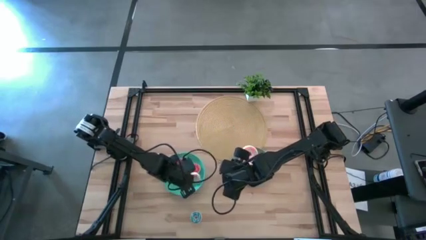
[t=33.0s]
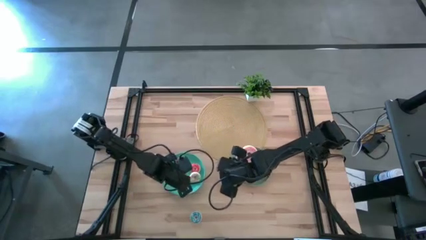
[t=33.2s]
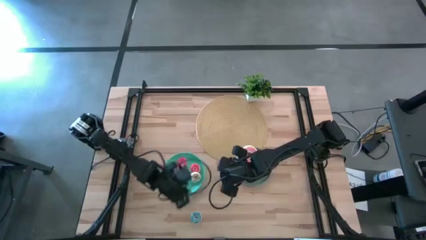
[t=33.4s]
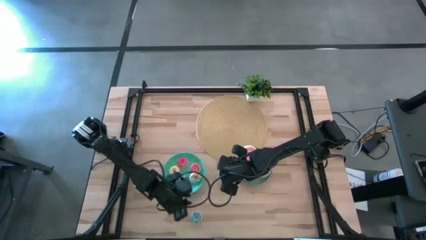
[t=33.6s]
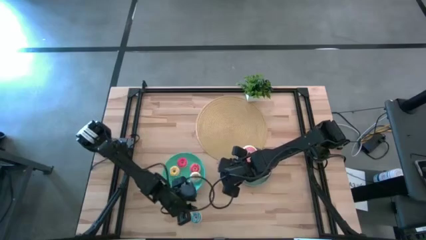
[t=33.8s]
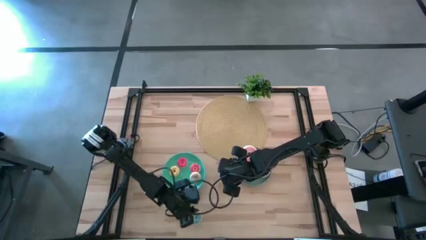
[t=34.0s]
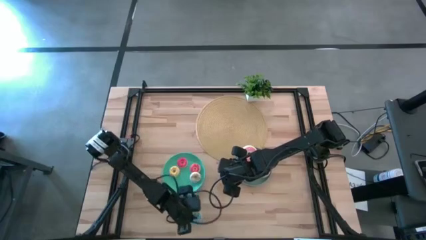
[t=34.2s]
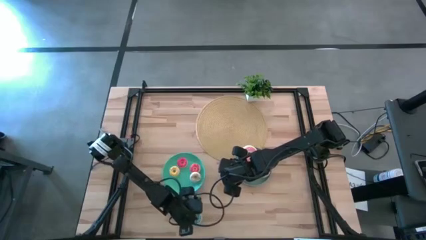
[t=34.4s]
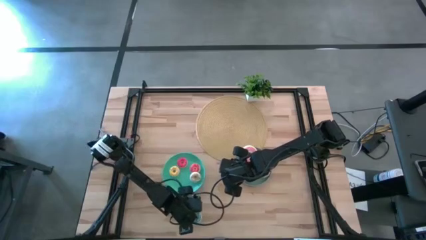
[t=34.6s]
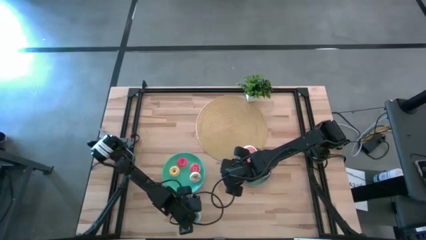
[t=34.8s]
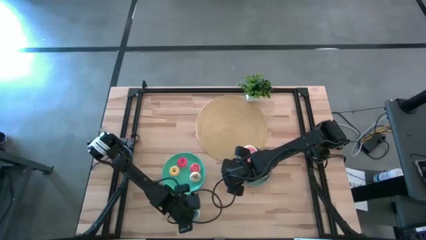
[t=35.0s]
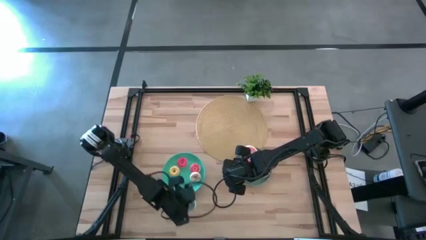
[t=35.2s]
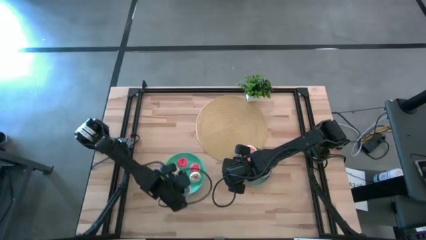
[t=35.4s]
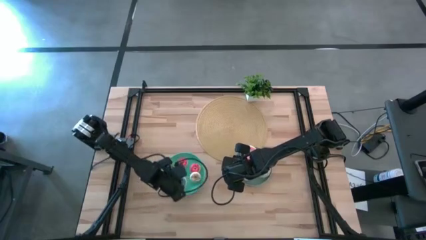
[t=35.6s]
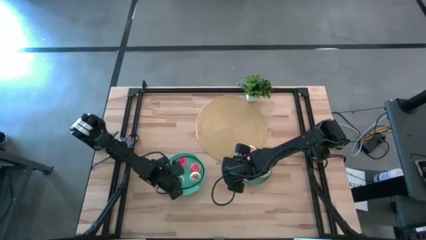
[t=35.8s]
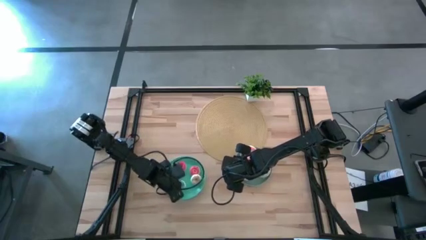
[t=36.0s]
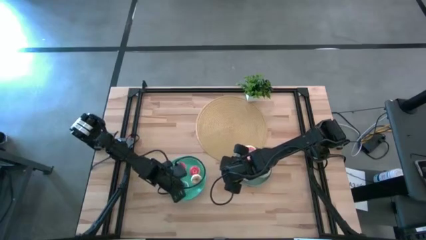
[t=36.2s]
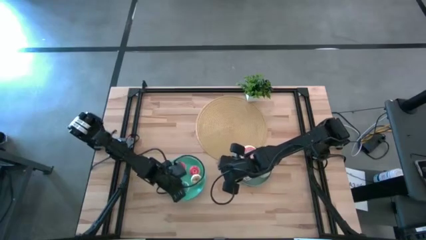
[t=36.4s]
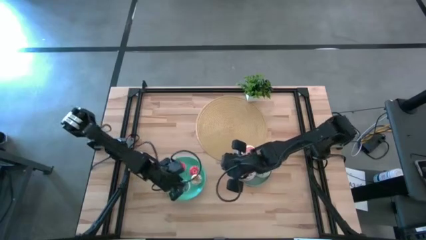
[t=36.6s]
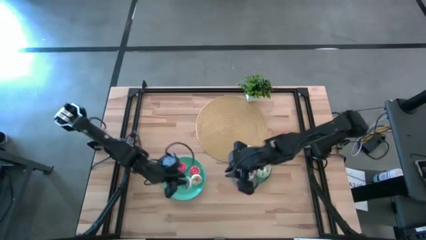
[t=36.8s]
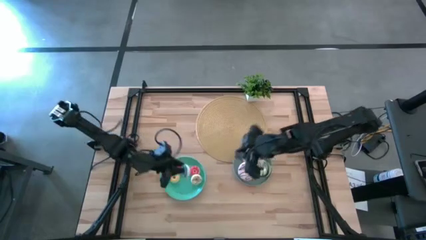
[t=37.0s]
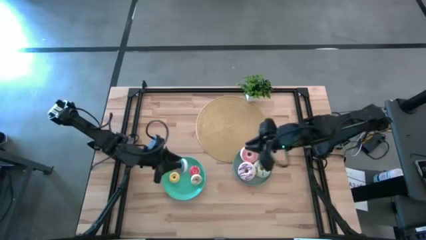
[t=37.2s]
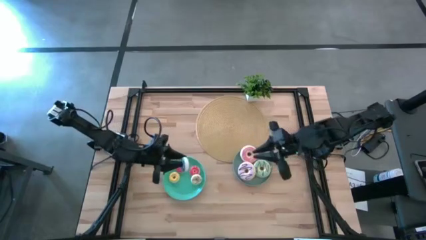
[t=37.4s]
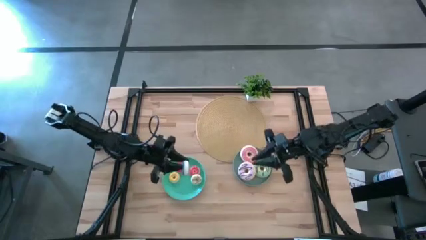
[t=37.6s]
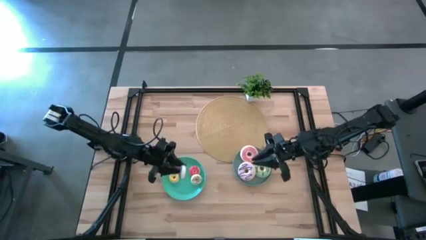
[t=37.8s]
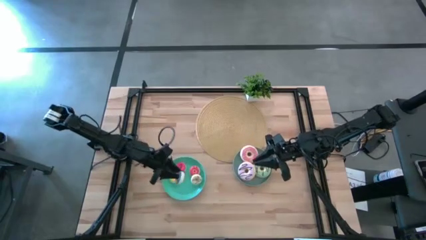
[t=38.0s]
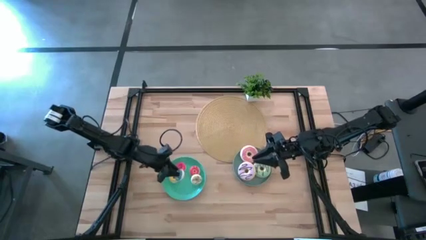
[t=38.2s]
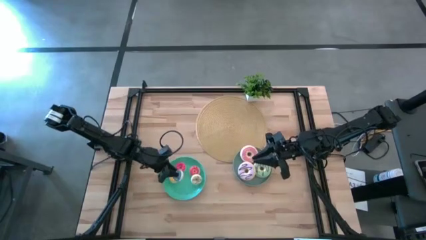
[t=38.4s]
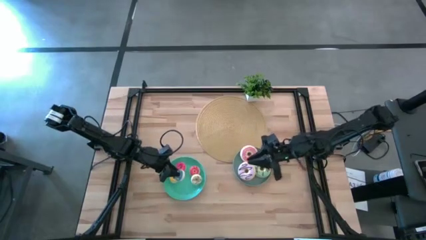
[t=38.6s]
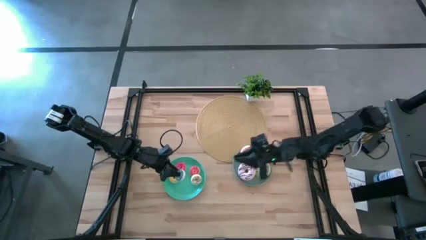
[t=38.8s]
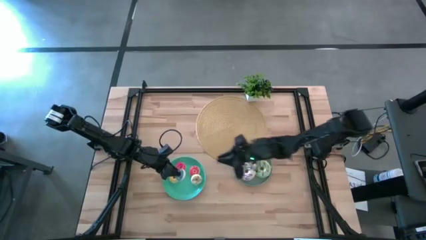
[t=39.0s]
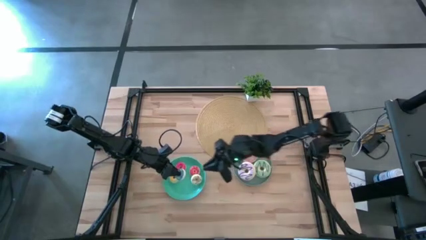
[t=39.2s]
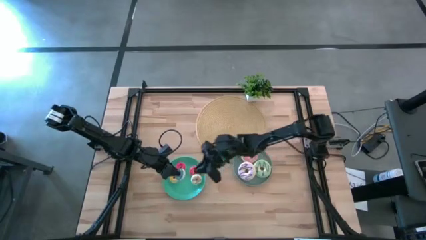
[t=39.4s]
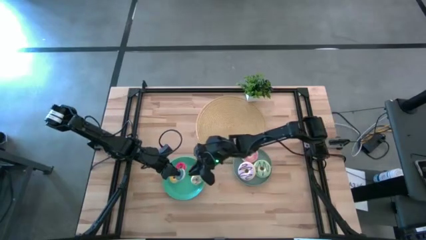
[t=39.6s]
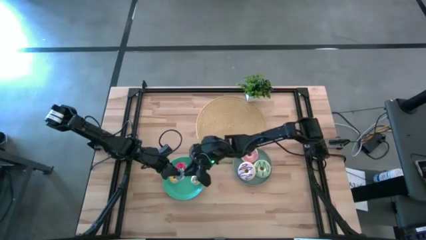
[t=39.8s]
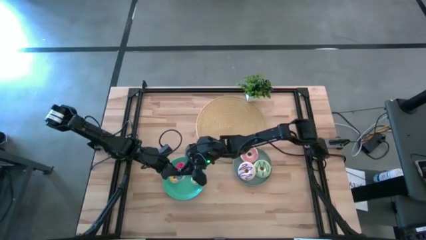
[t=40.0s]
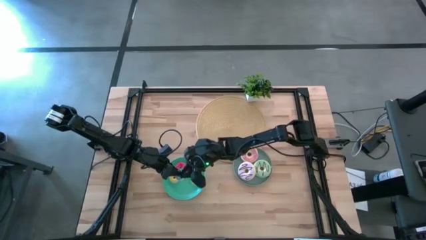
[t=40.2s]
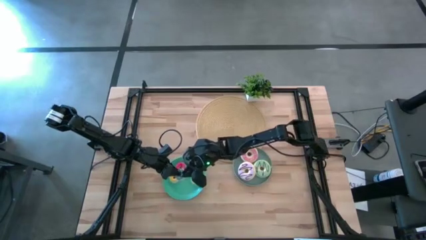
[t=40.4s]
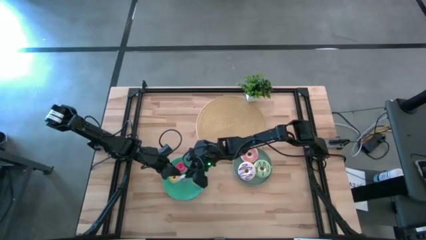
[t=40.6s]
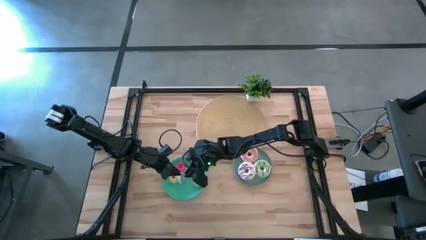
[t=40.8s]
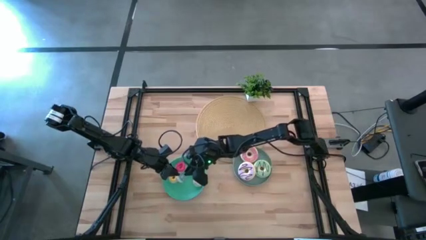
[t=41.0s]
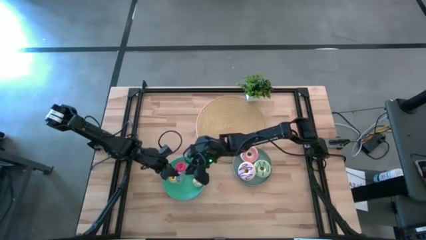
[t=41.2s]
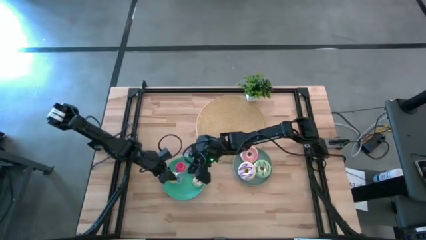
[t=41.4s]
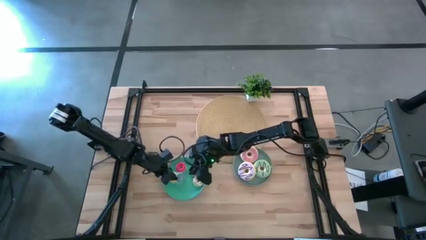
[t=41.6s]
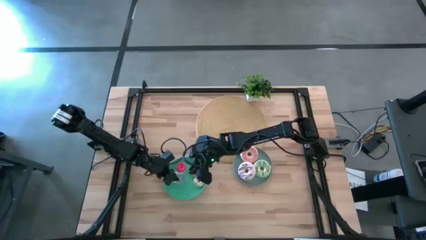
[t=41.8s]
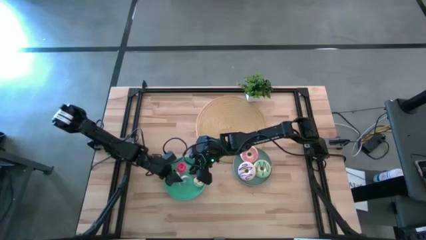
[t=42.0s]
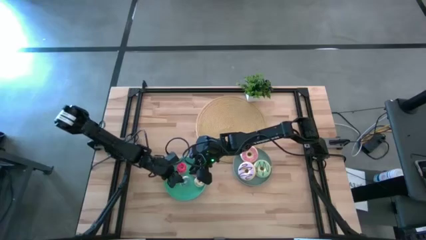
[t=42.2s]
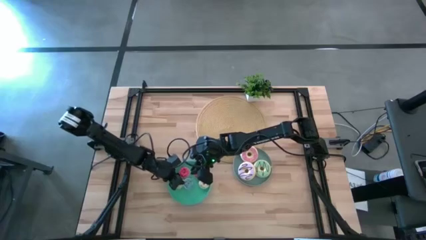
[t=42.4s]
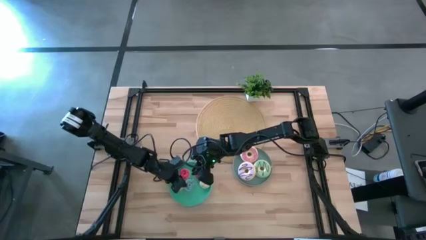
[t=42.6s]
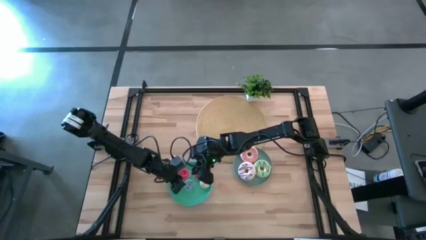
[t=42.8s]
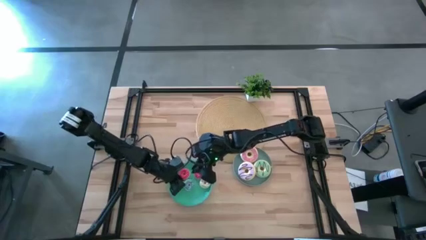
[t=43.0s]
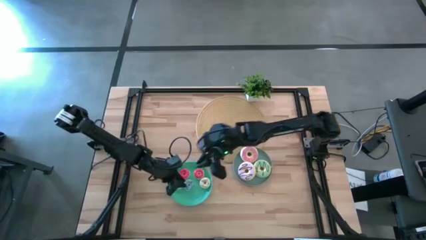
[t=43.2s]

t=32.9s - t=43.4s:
Task: Pick & Place donuts
Put the small blue donut on the light green plate

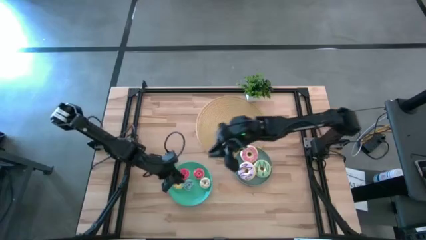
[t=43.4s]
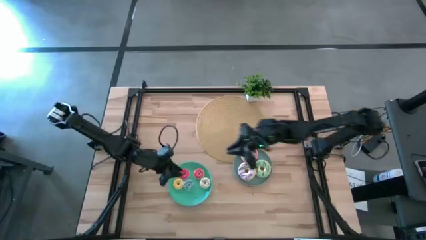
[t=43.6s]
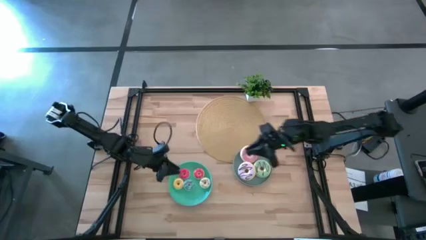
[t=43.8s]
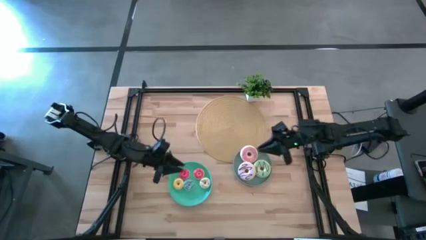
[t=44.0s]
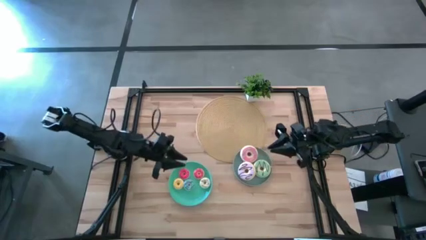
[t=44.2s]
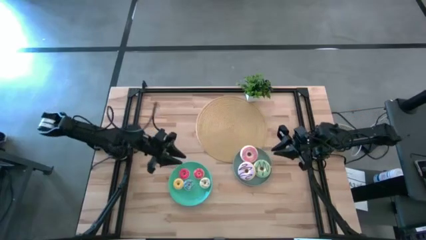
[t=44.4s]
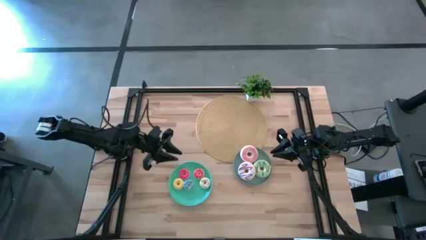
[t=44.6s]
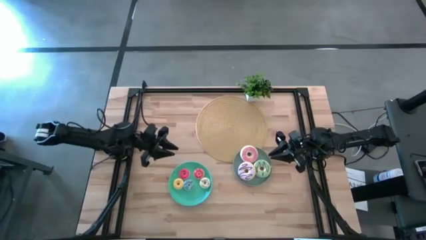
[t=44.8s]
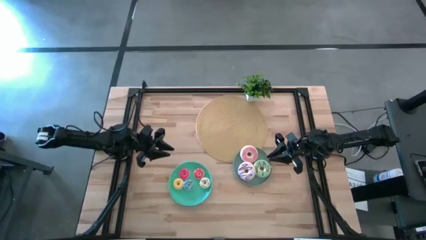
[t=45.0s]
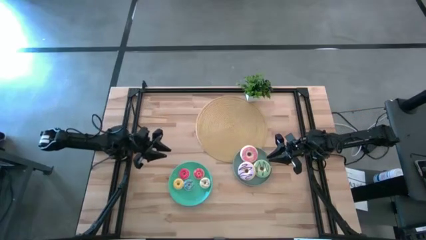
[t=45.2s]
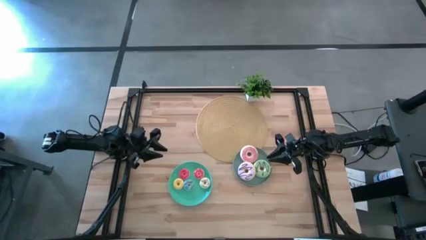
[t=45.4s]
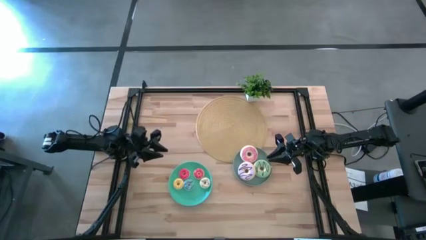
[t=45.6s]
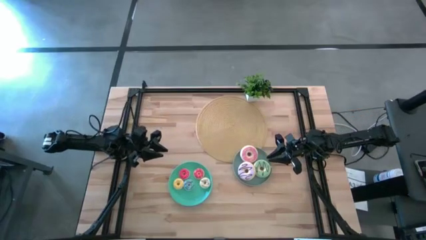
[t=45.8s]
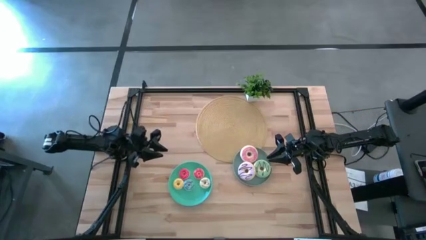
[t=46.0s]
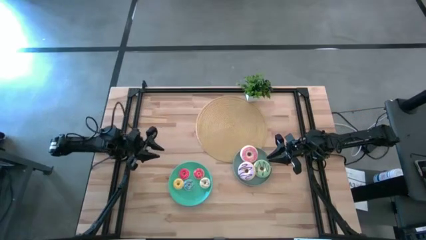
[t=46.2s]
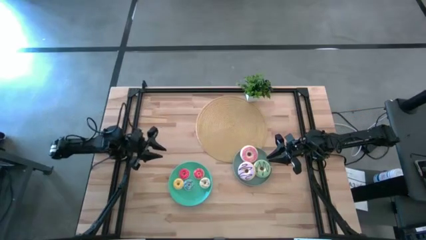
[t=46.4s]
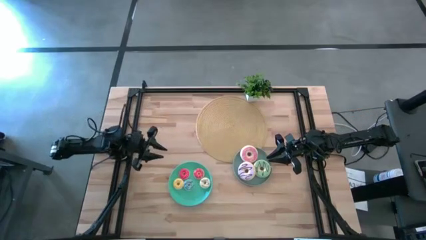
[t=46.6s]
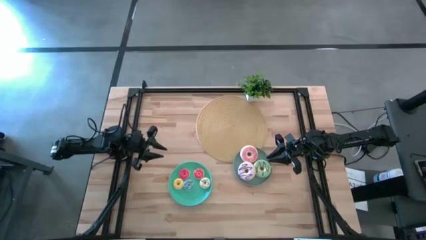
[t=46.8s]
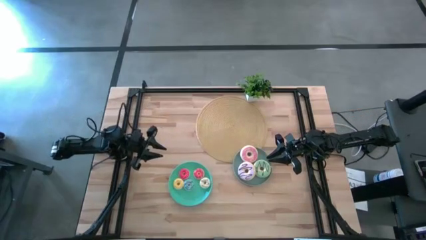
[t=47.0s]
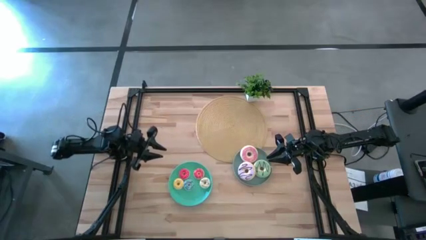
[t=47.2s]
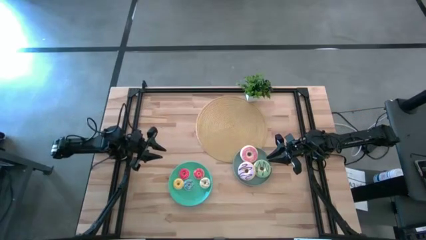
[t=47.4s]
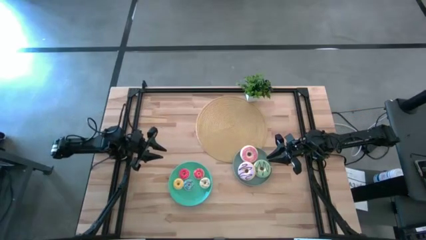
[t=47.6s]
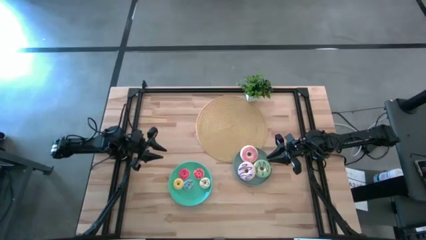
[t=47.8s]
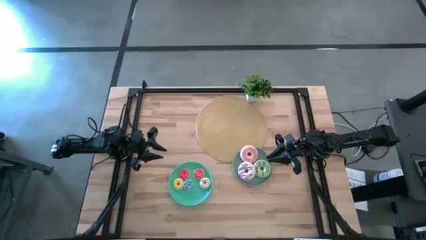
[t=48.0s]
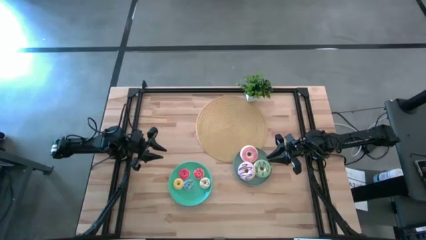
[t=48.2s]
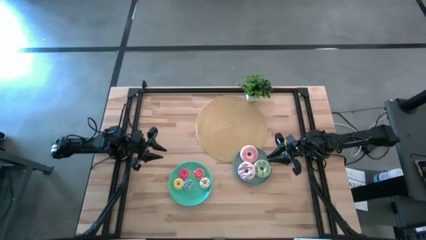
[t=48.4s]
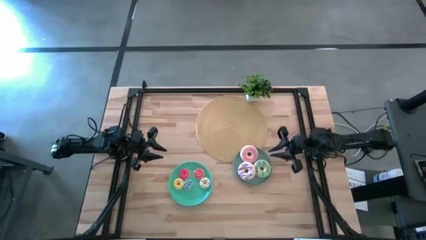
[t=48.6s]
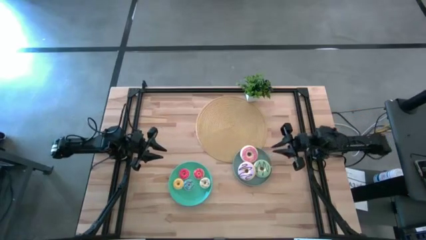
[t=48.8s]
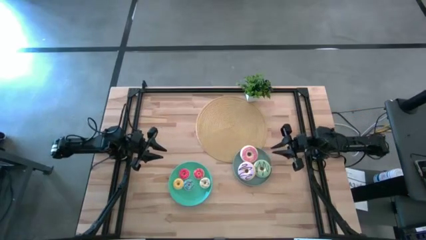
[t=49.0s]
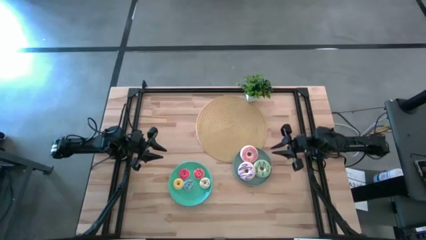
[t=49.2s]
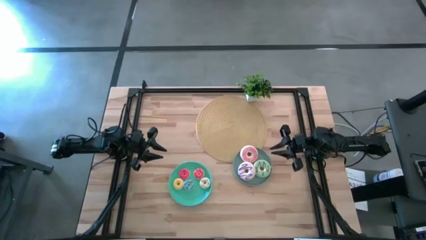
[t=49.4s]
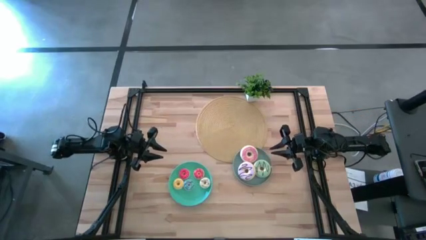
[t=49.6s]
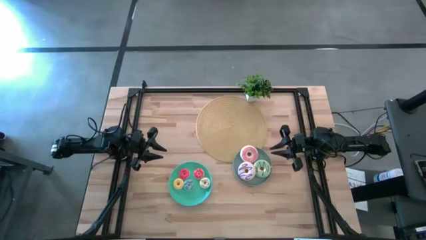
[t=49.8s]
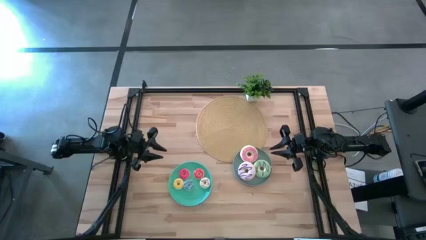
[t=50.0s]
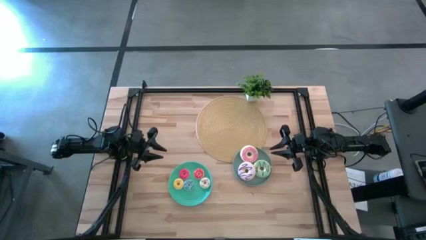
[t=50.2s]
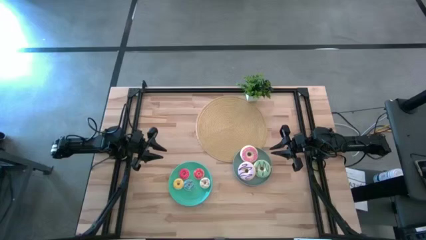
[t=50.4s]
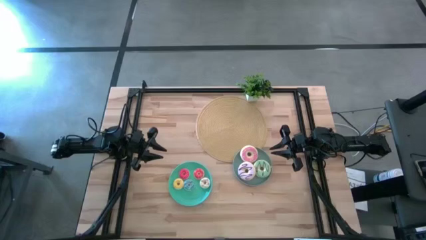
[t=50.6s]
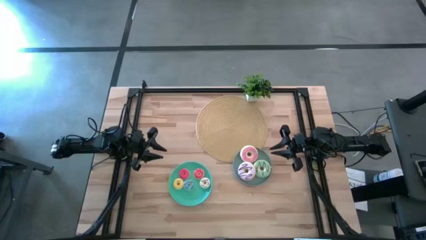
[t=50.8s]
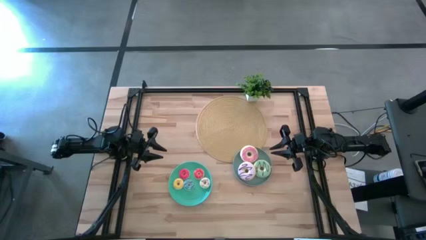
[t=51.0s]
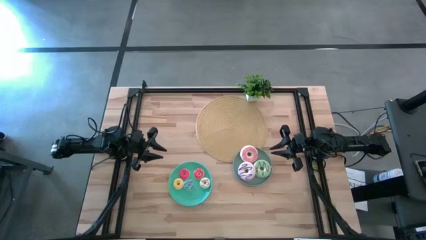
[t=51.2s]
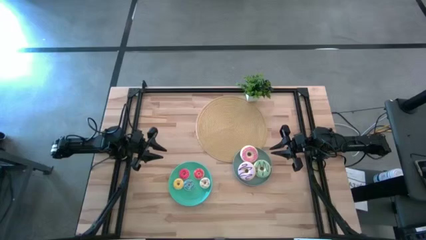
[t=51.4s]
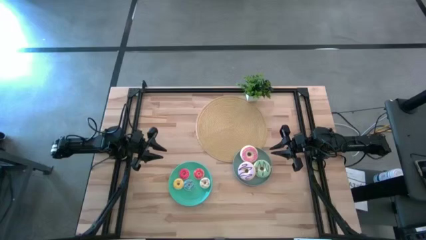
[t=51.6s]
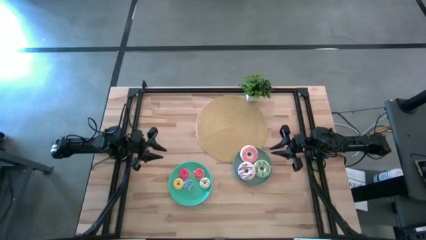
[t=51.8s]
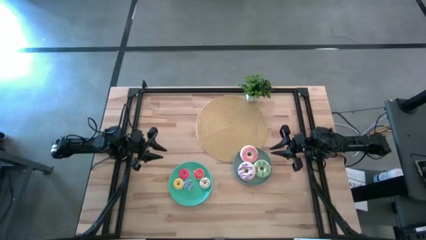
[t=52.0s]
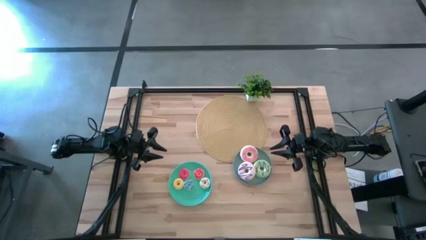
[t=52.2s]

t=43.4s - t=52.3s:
Return to Home Position
